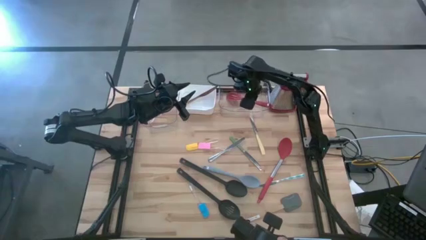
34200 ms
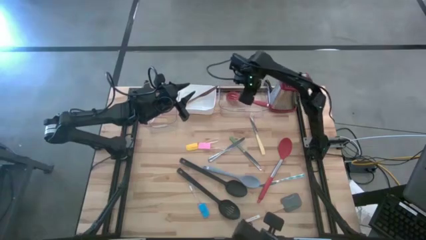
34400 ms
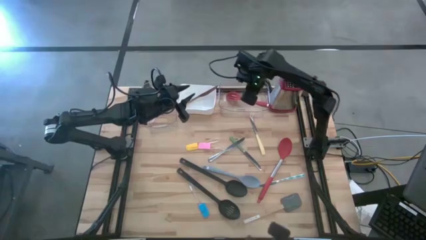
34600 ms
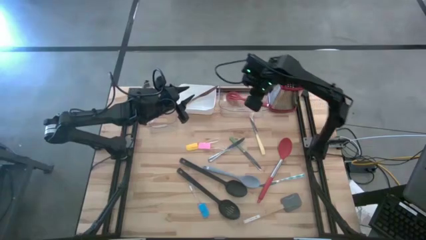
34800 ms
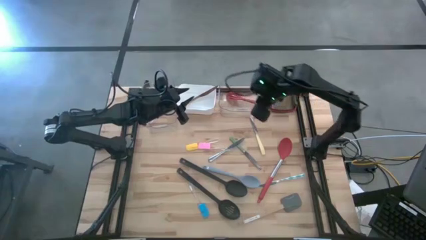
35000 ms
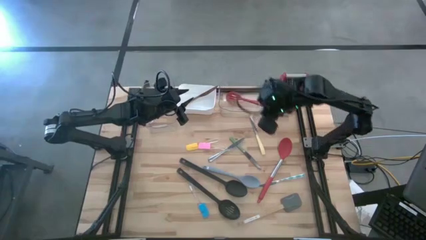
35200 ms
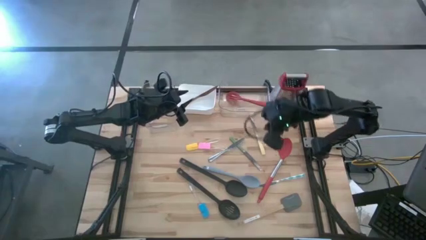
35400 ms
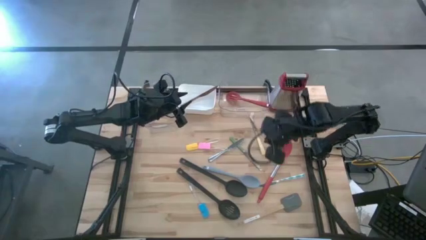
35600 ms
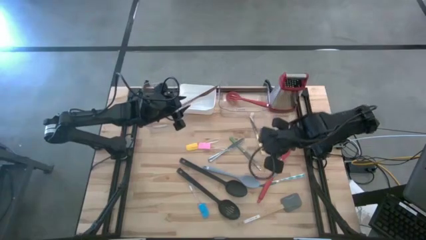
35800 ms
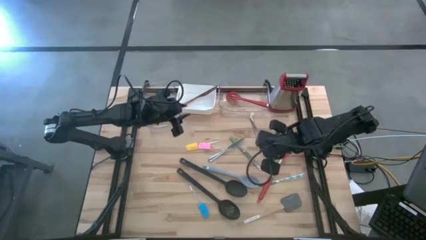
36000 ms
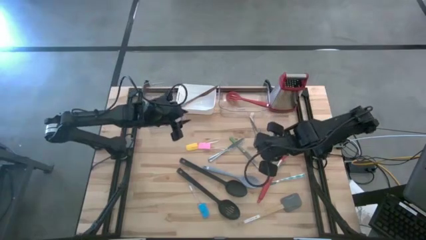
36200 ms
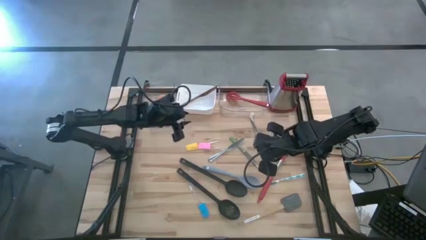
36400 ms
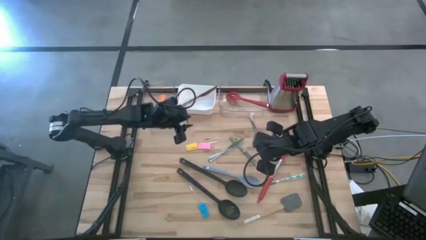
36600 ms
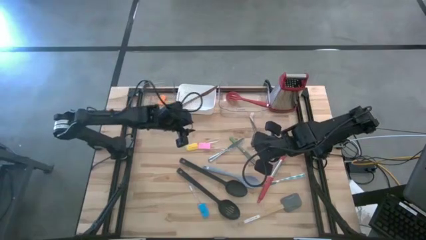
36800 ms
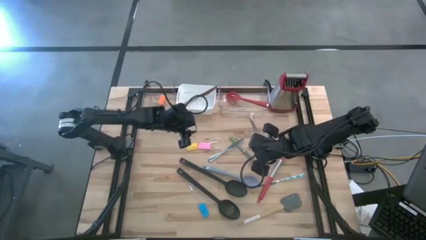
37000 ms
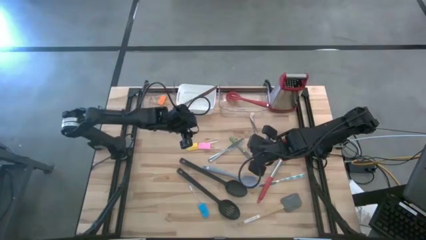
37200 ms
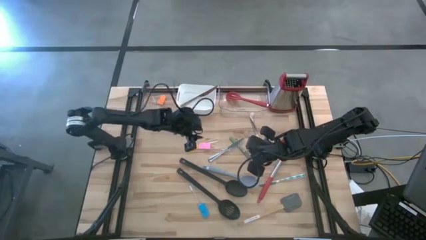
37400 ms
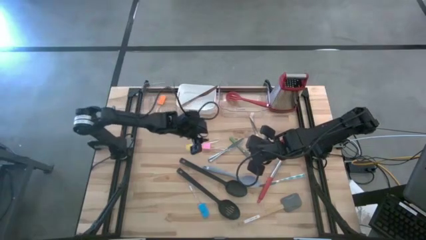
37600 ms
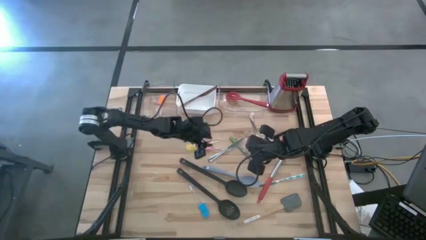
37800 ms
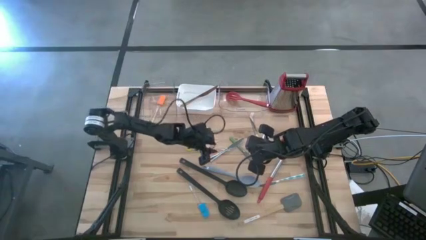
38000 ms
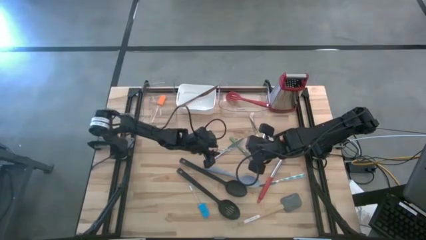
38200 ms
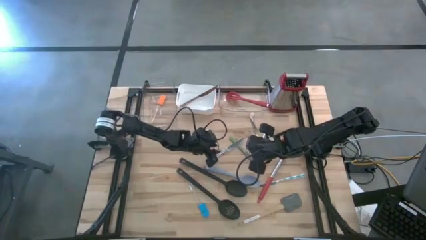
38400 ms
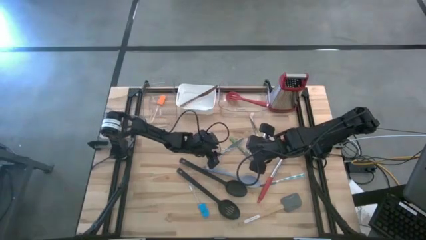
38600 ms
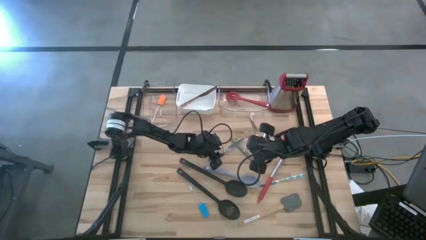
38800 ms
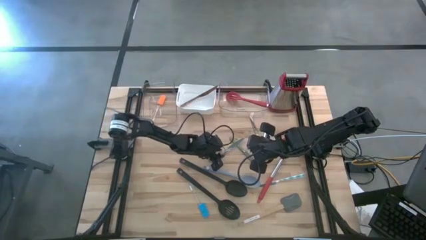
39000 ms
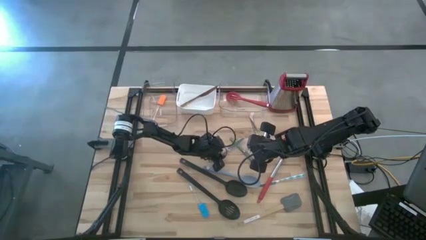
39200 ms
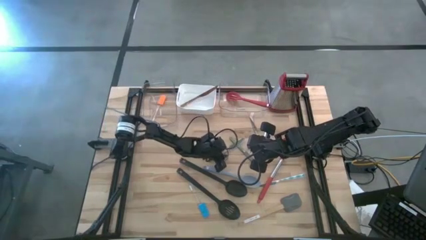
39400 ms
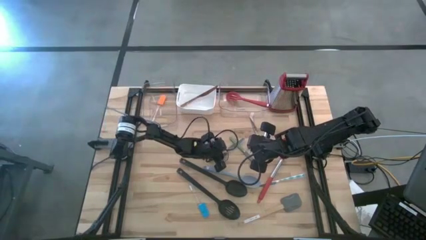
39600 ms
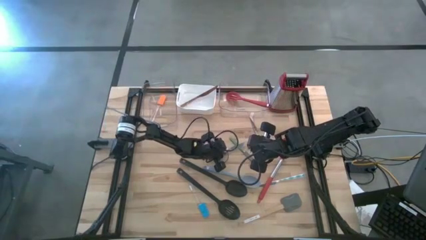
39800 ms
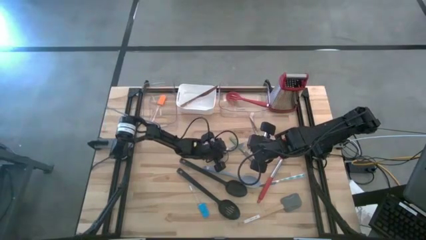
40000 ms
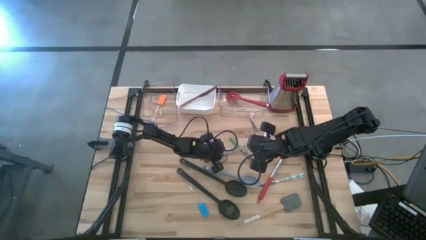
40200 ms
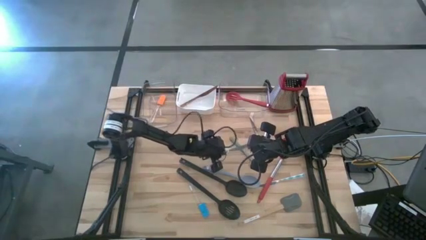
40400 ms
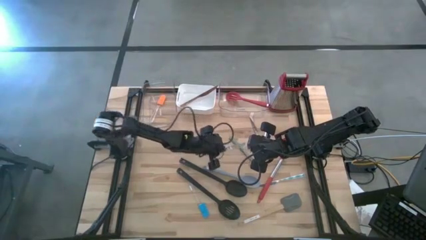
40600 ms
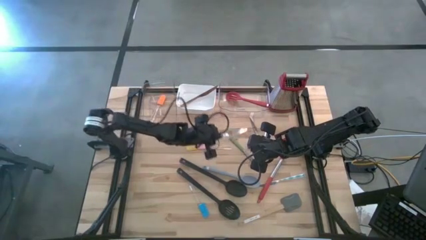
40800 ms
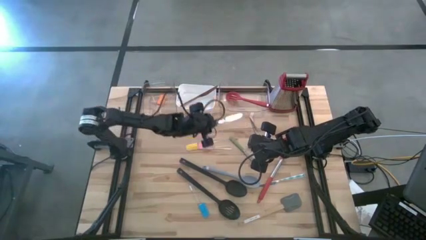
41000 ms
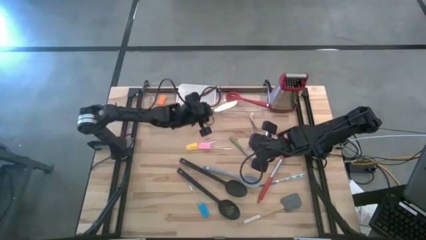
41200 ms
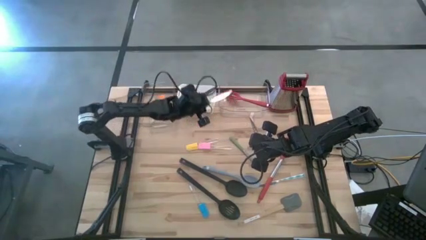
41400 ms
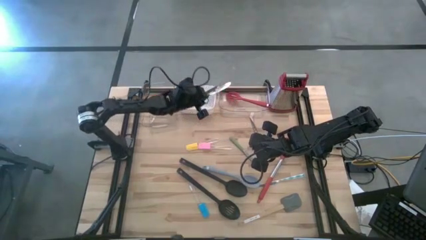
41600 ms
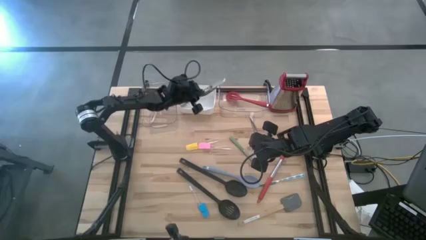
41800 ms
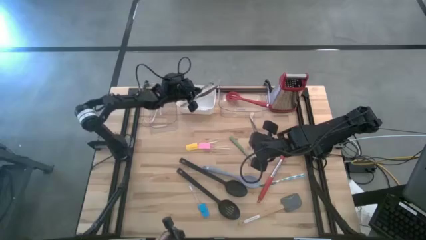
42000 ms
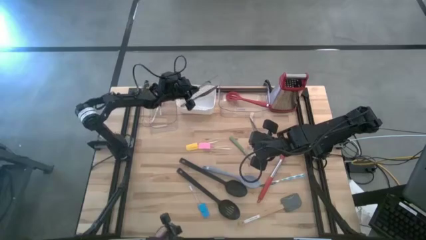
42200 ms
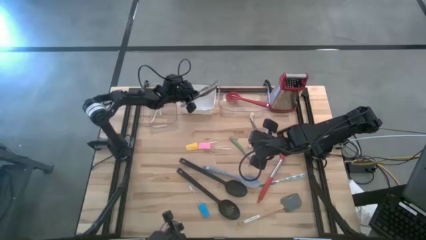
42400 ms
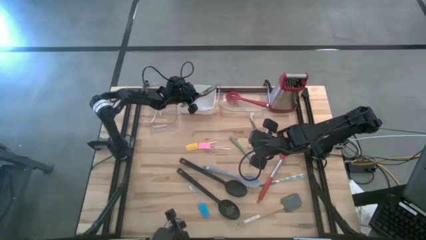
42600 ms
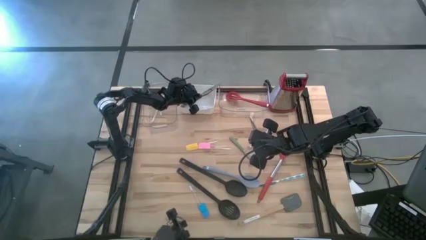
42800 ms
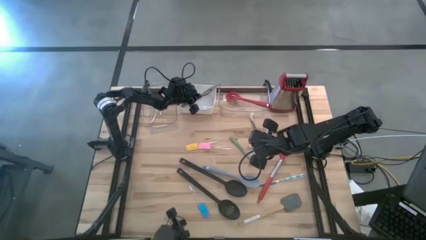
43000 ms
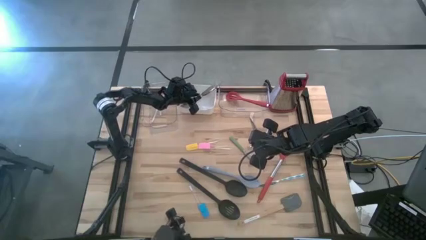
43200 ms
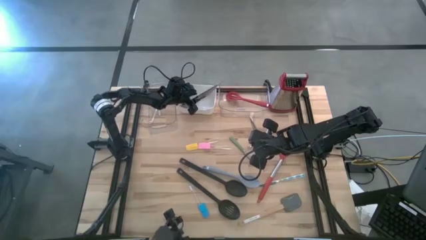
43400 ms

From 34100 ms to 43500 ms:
Task: Pick & Place Kitchen Items
Put the top silver knife into the white bin

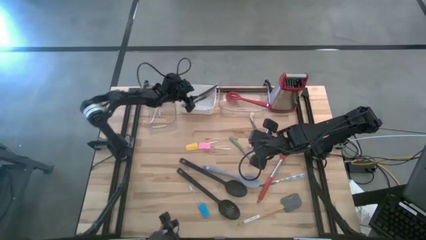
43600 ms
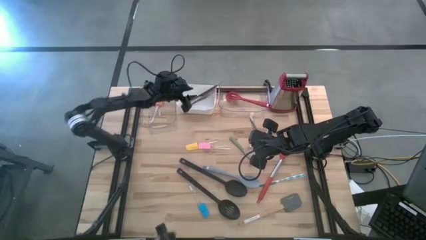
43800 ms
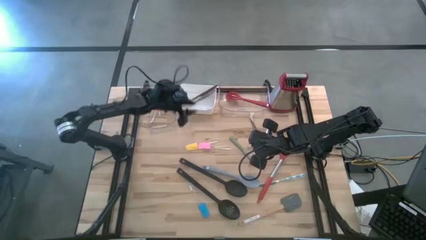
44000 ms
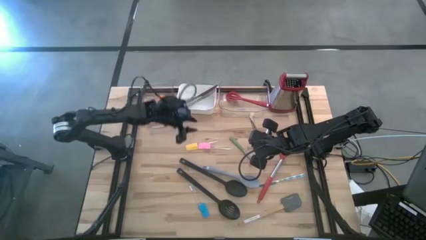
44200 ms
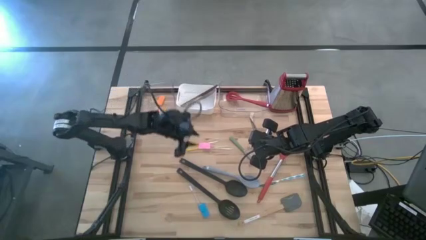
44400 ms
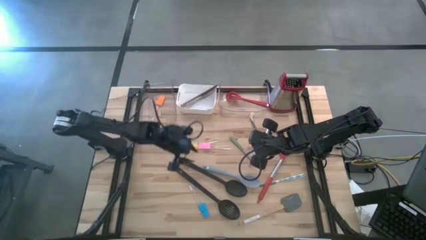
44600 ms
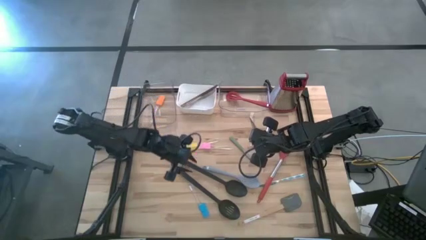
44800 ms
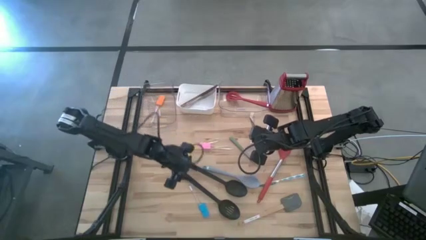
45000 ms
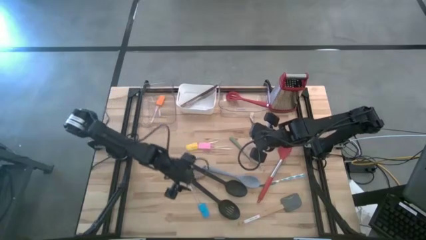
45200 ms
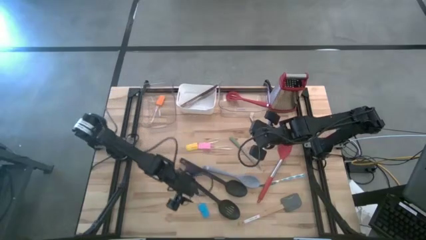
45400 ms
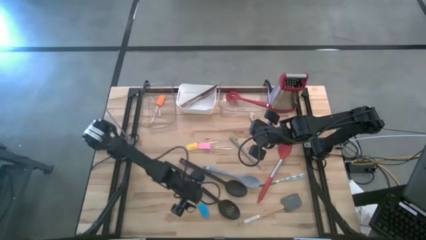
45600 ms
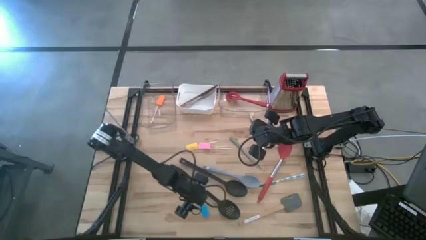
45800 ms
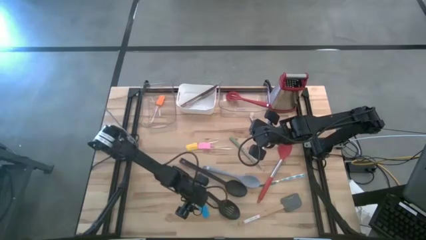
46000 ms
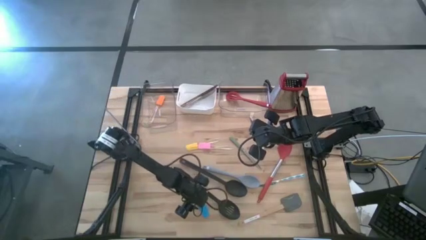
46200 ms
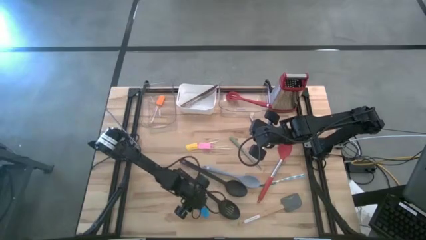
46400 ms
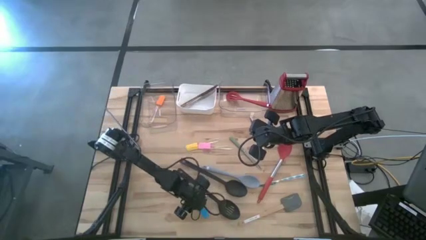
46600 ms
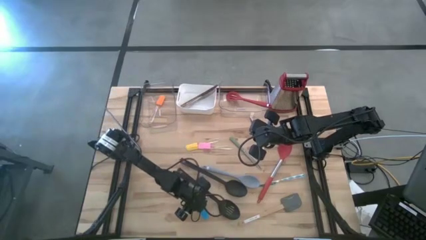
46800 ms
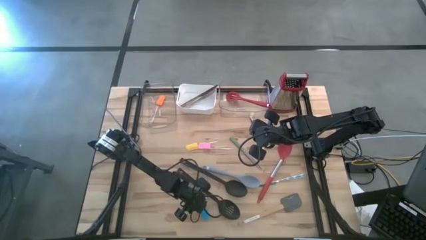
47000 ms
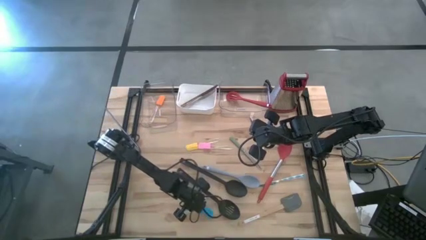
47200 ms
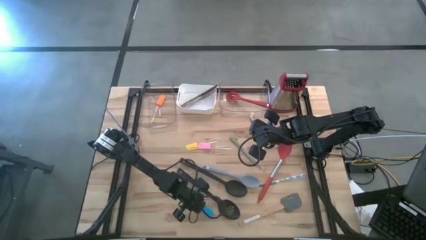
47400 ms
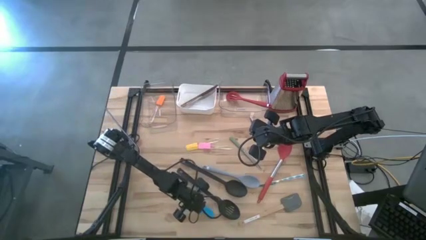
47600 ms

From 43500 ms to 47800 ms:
Put the blue spatula into the left transparent bin

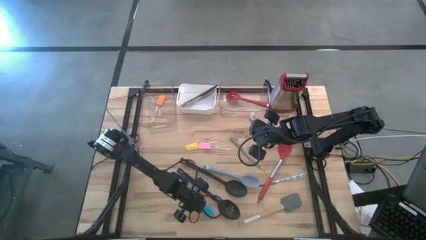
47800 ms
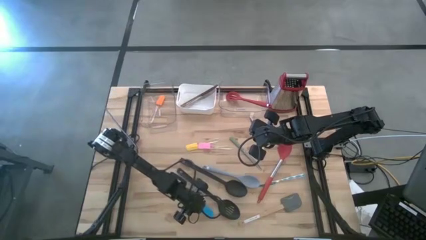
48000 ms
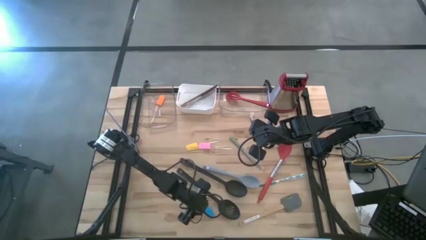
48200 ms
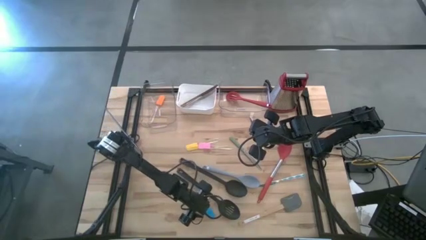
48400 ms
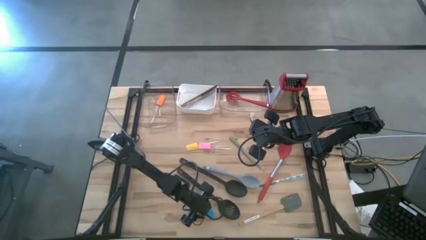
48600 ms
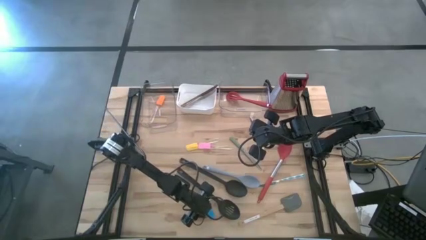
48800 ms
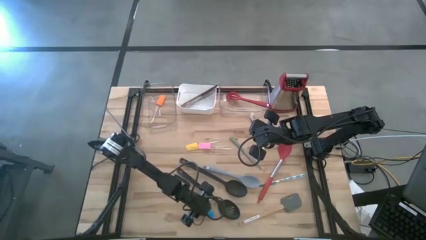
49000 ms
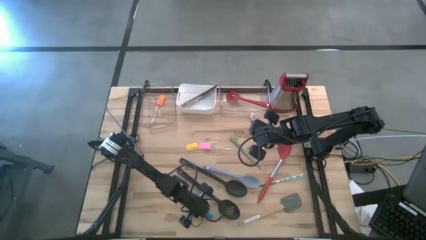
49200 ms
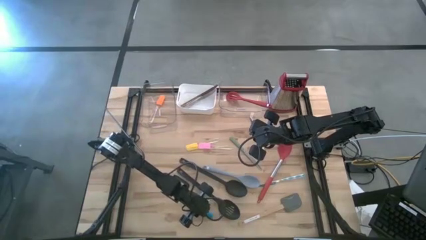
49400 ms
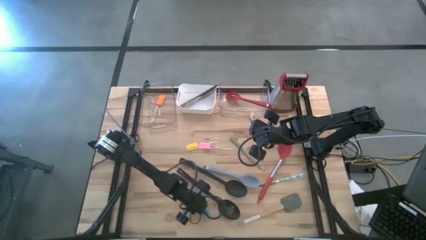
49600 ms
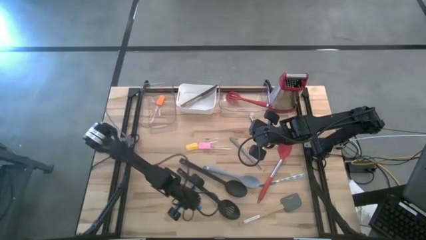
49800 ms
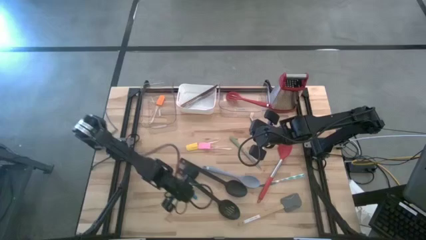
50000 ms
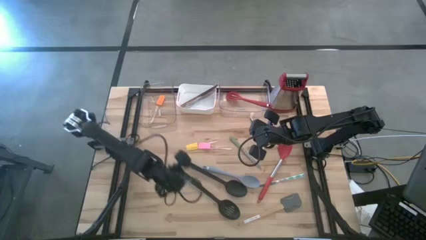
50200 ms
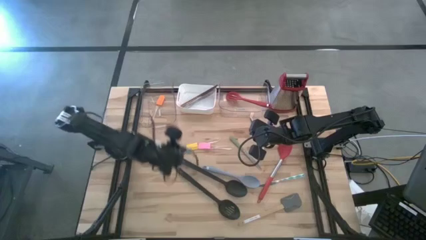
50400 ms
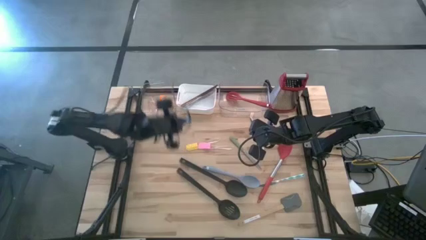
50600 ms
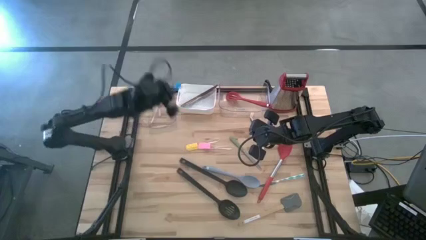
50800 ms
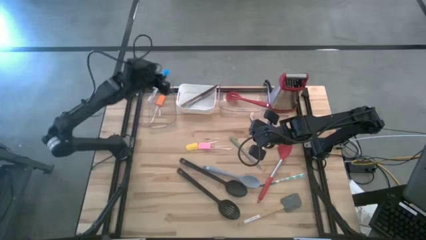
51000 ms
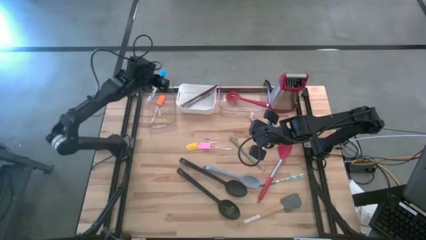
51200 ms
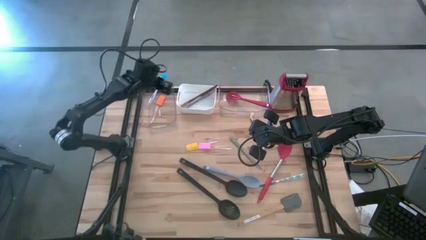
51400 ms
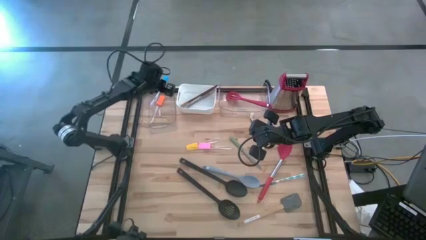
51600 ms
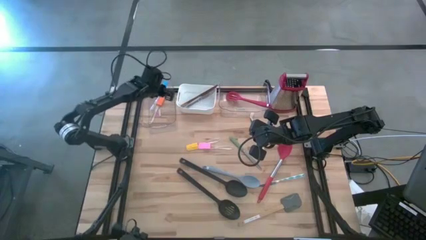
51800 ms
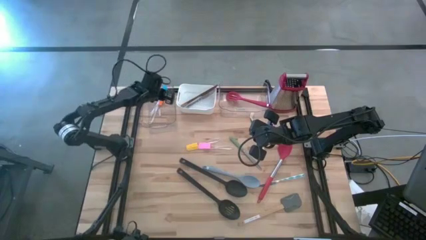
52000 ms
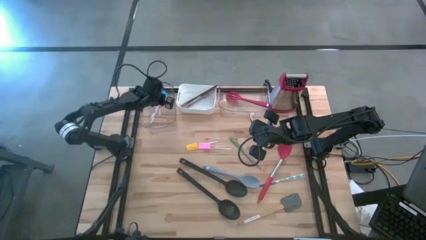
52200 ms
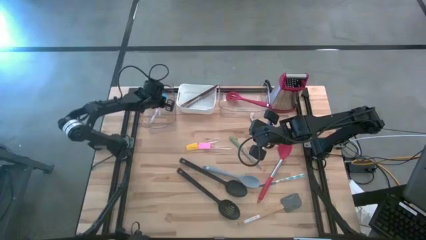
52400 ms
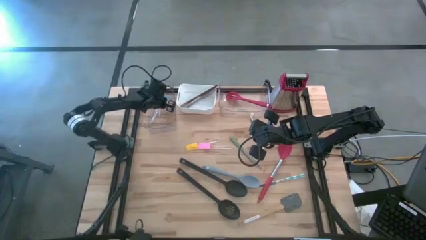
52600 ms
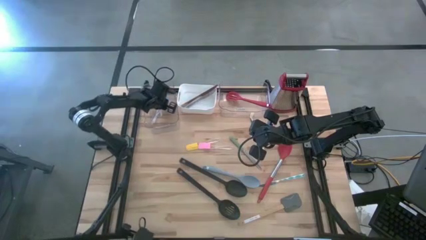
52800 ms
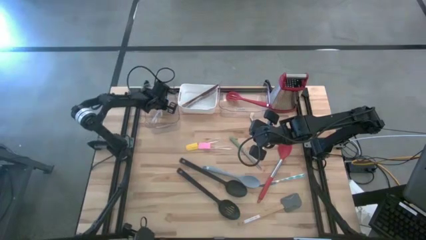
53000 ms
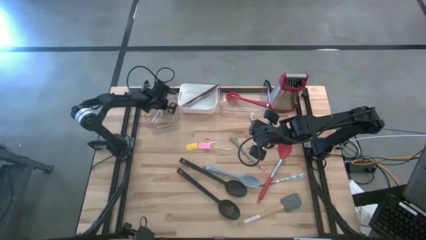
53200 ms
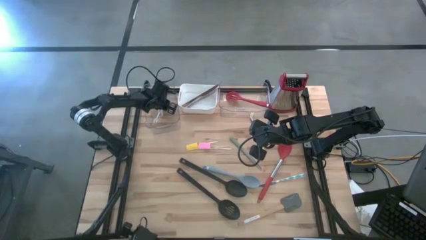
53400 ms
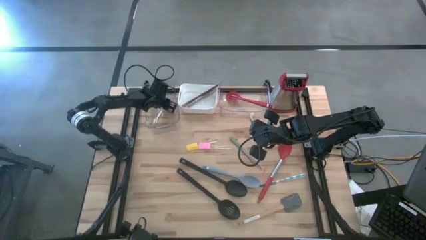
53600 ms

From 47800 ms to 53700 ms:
Put the blue spatula into the left transparent bin
